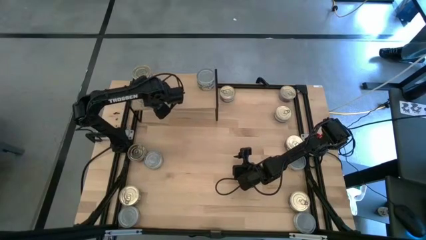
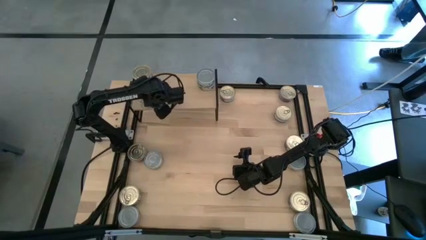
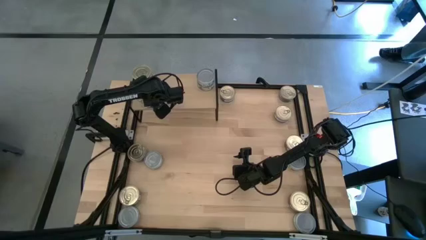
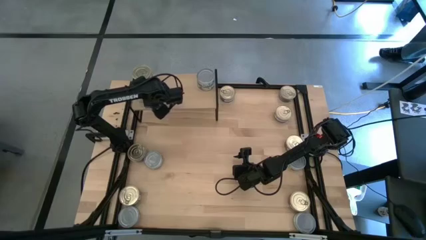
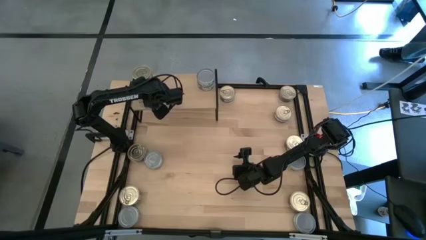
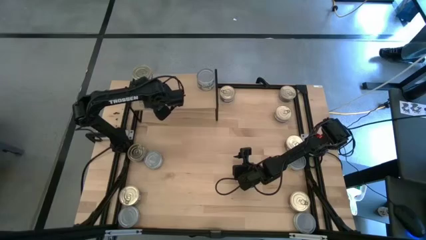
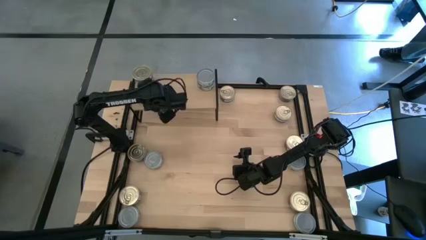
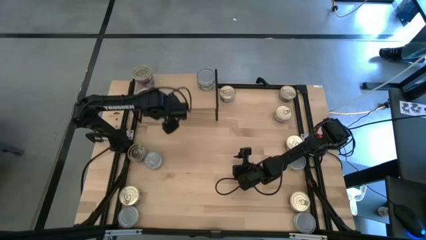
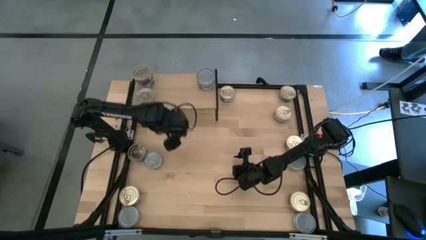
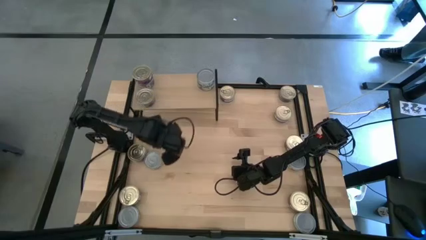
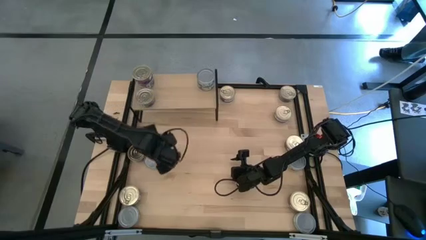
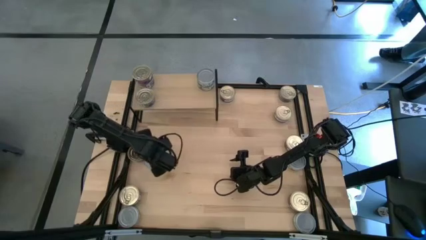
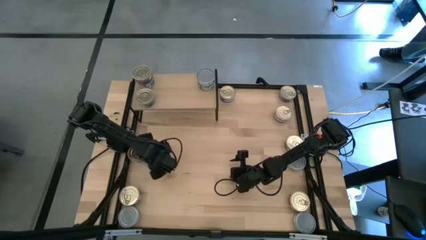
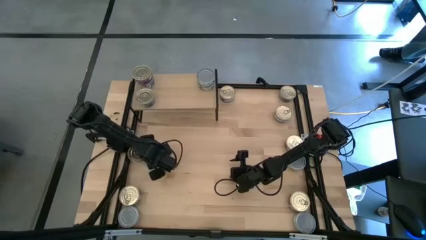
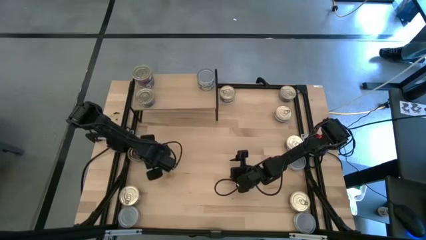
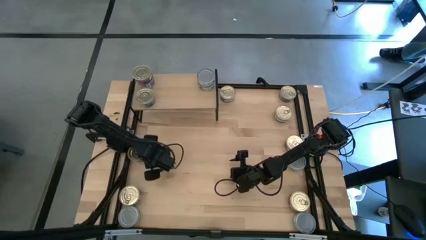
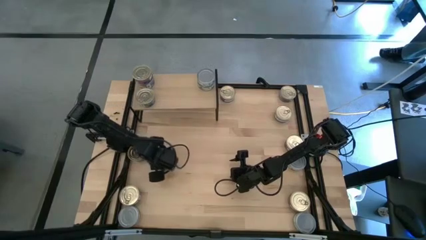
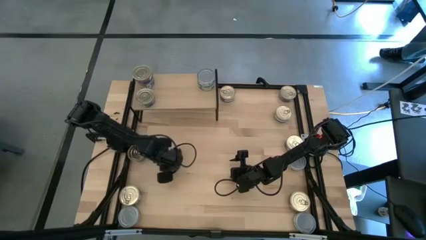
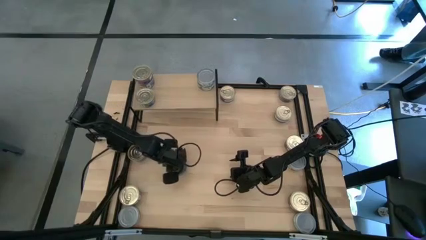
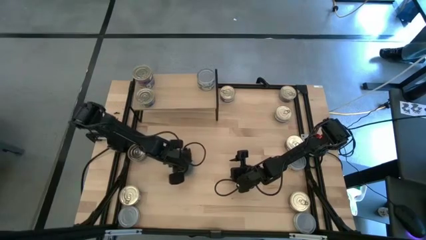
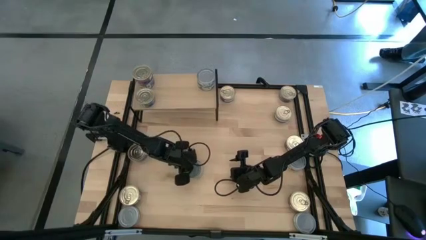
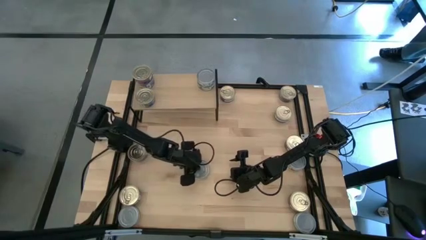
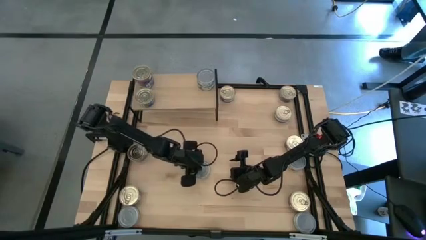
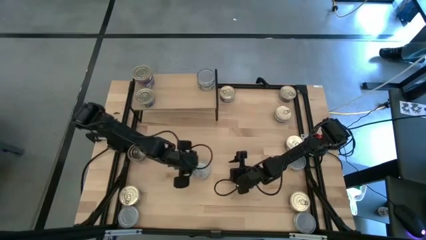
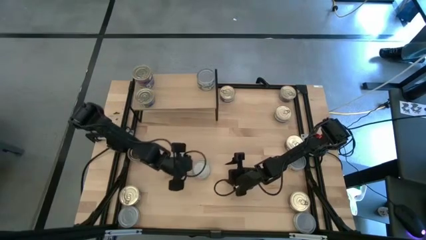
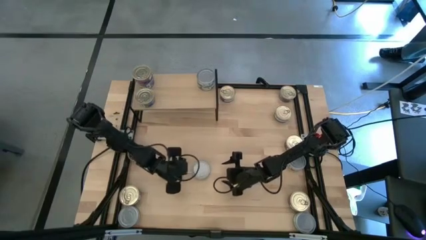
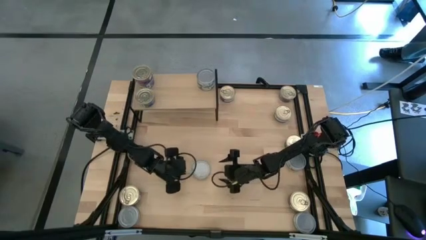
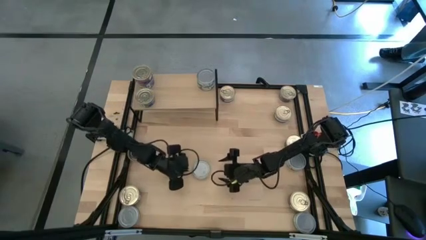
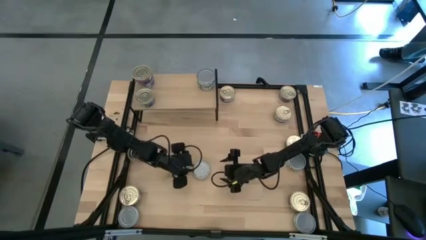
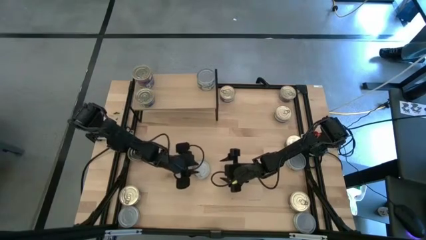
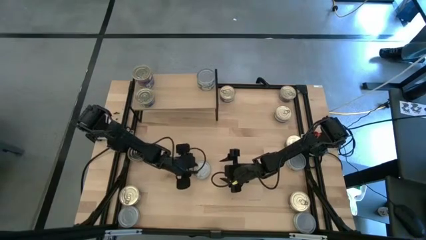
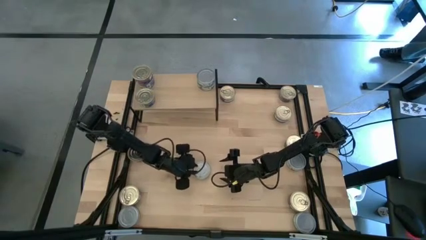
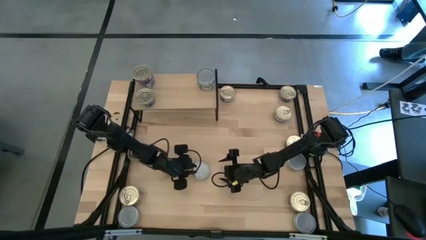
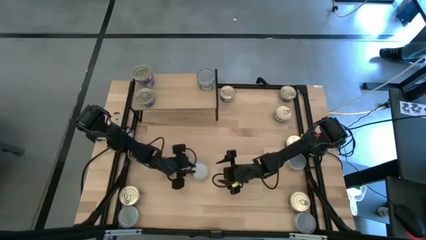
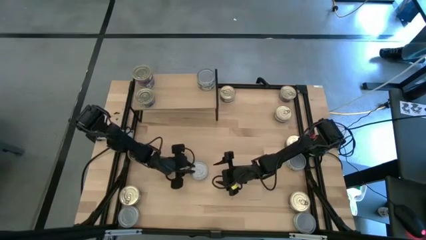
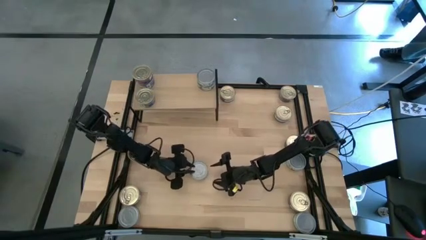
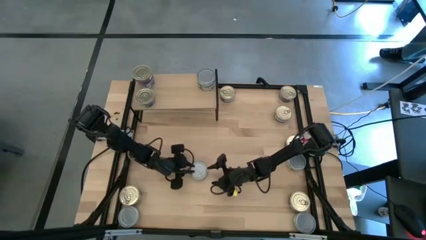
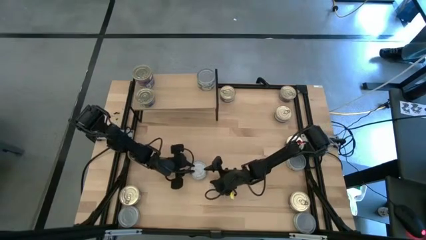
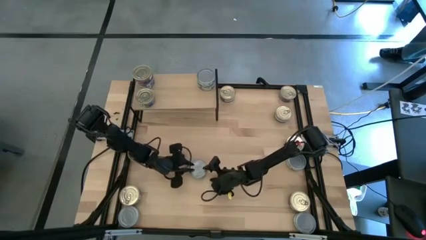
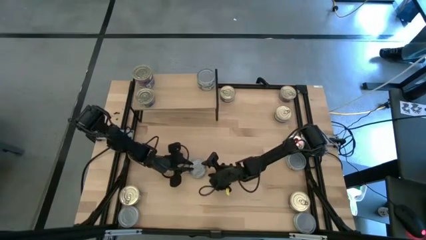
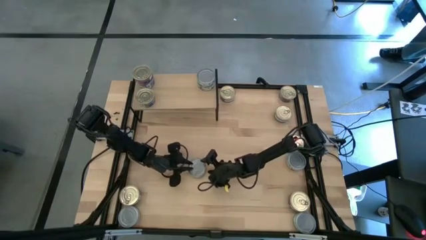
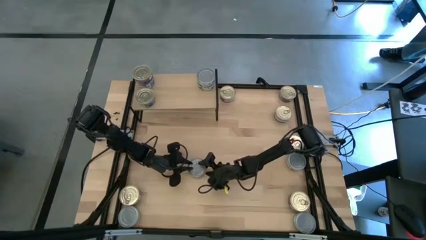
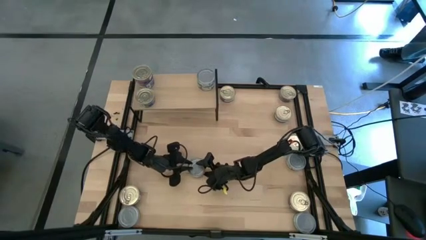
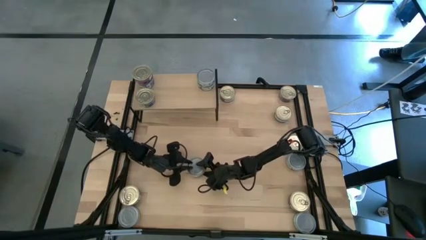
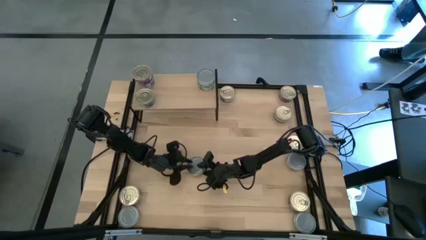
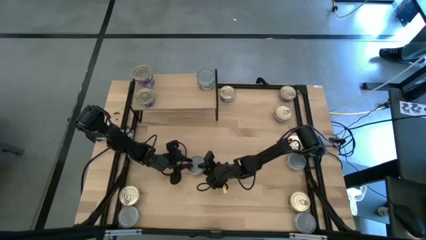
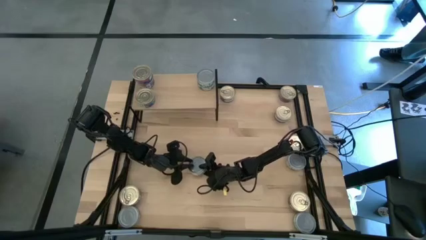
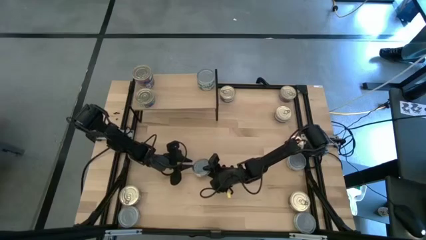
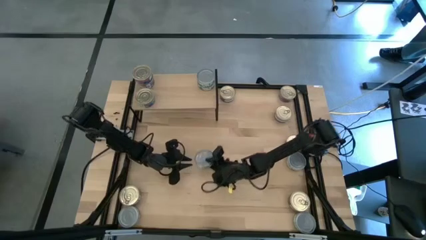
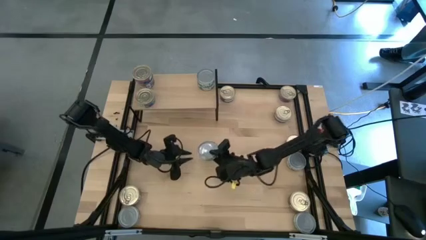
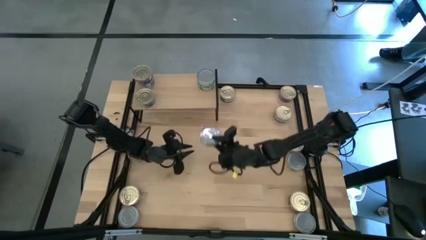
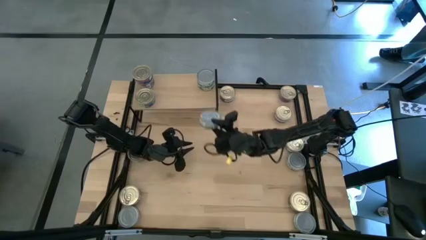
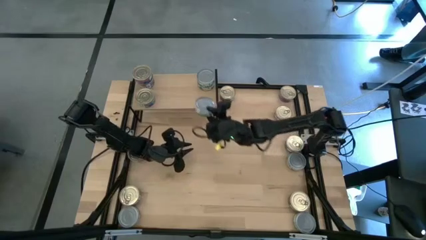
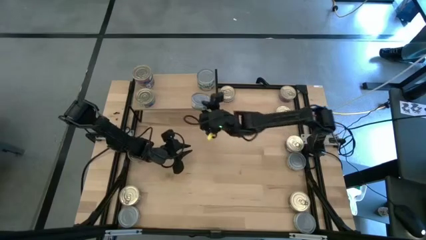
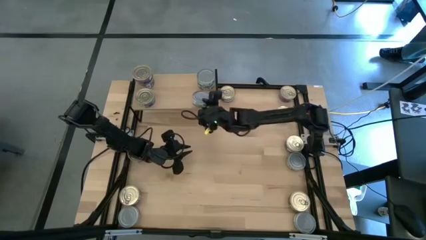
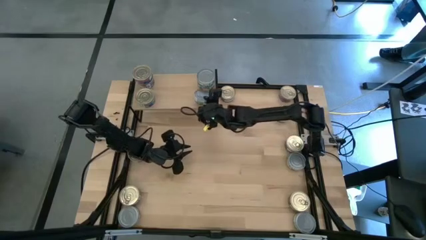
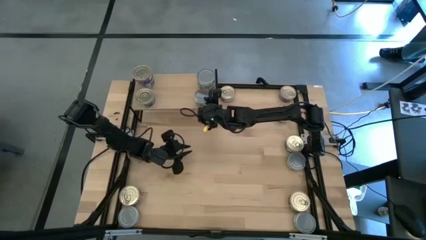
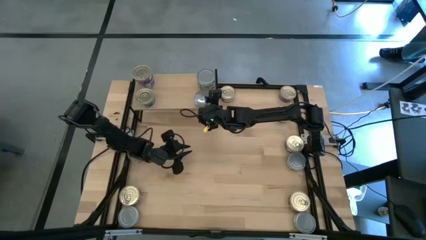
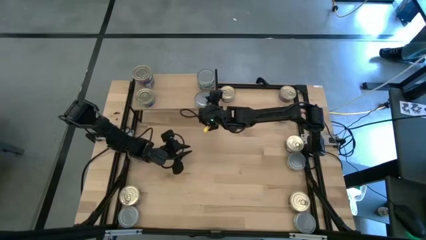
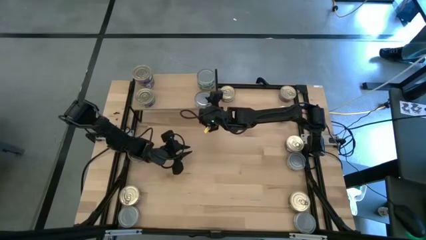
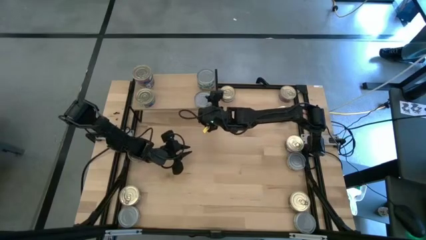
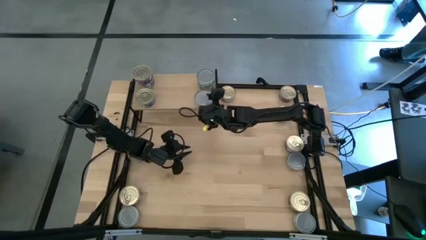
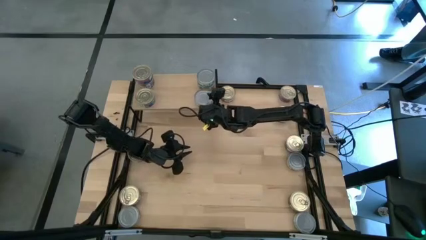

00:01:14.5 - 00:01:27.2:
Task: Stack canned seafood by type on shelf
Put the green tuna can on the shelf aligned with the other green tuna
